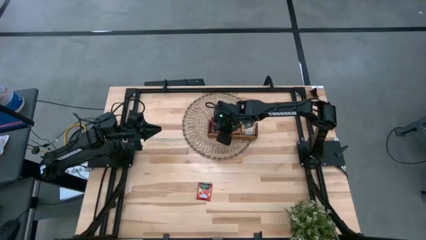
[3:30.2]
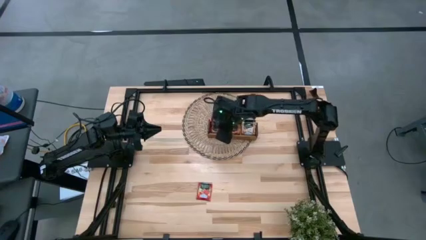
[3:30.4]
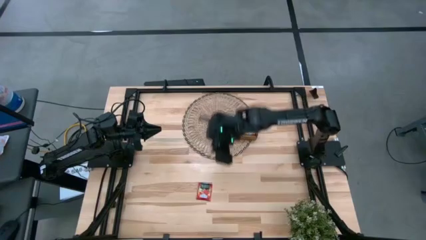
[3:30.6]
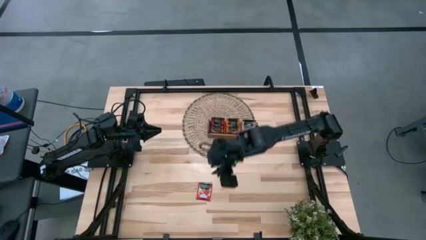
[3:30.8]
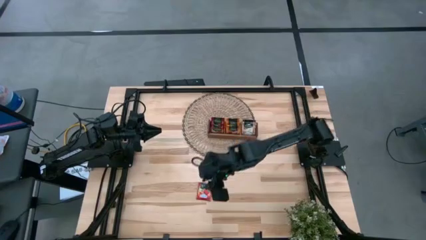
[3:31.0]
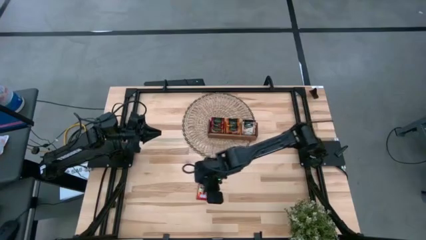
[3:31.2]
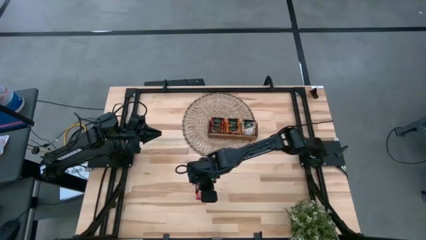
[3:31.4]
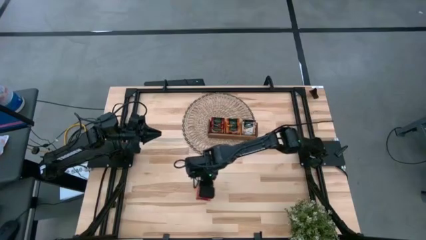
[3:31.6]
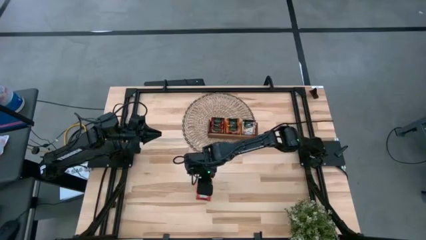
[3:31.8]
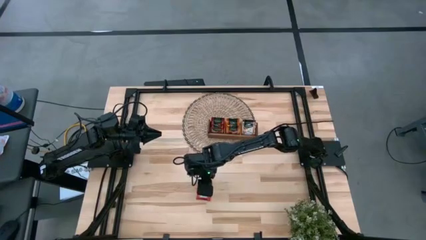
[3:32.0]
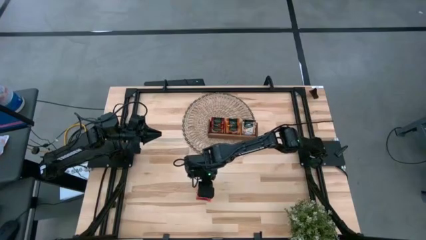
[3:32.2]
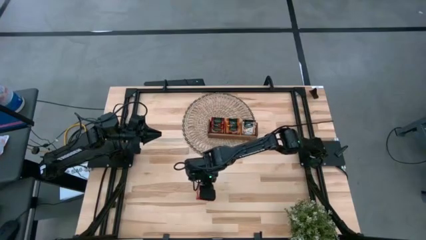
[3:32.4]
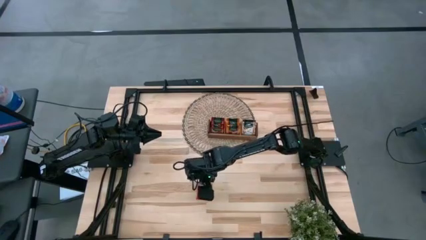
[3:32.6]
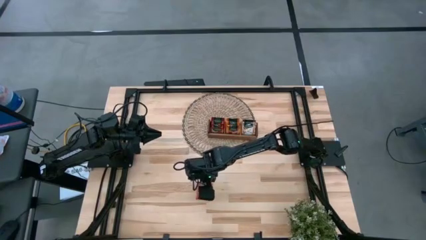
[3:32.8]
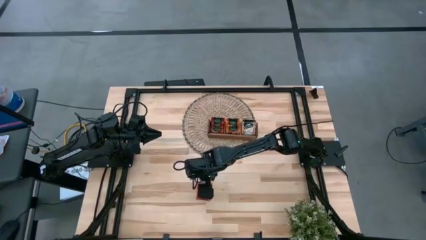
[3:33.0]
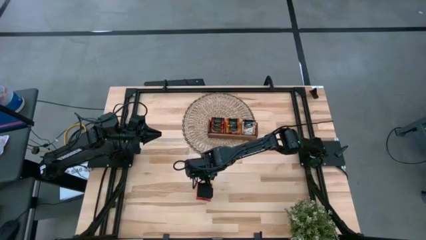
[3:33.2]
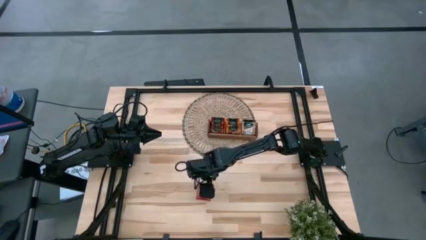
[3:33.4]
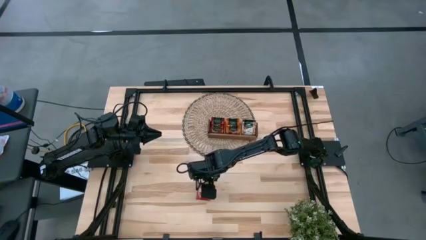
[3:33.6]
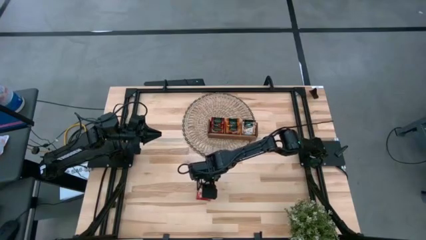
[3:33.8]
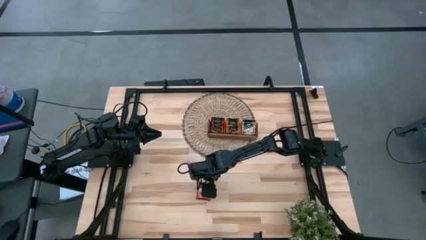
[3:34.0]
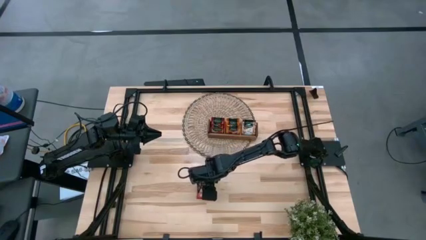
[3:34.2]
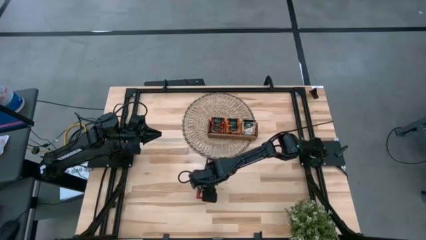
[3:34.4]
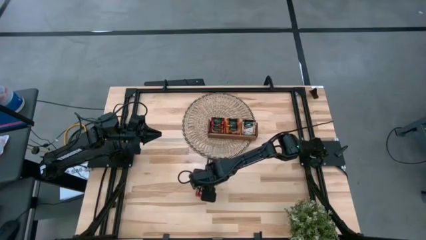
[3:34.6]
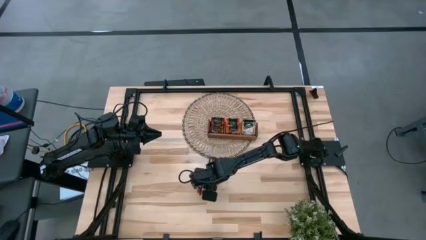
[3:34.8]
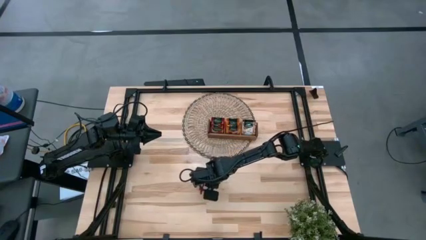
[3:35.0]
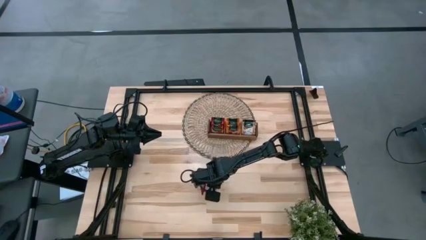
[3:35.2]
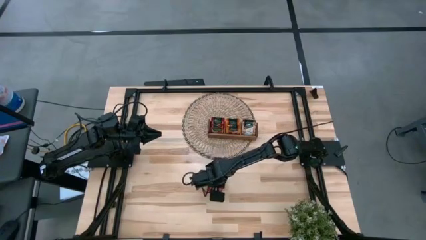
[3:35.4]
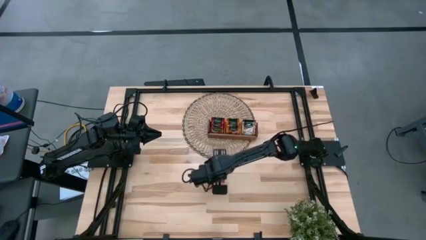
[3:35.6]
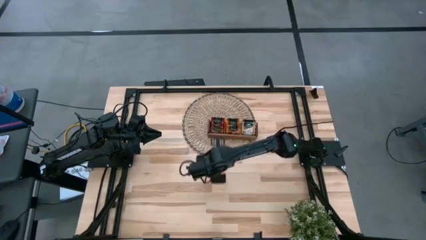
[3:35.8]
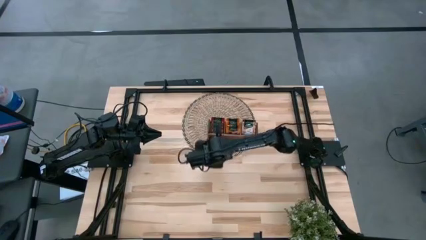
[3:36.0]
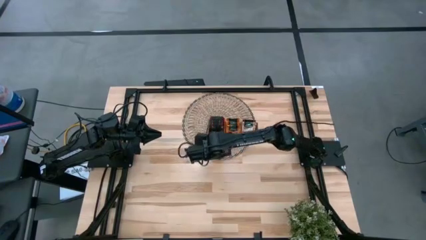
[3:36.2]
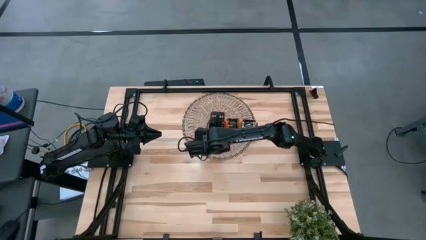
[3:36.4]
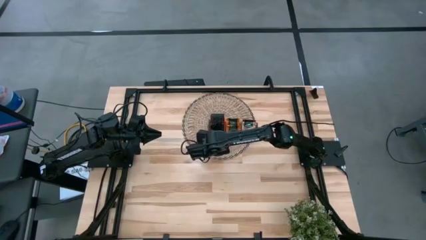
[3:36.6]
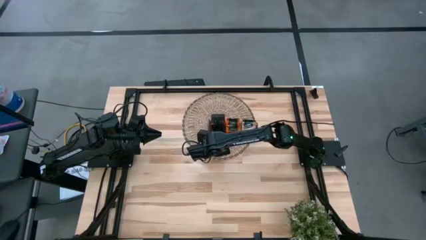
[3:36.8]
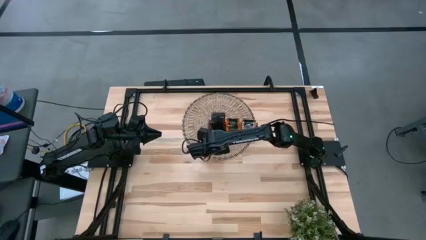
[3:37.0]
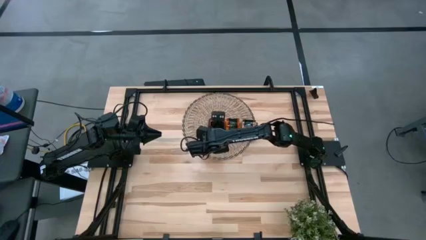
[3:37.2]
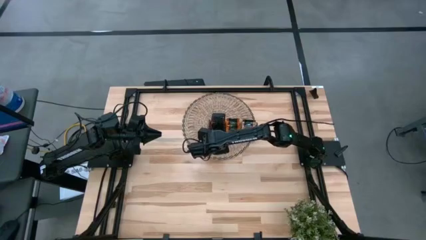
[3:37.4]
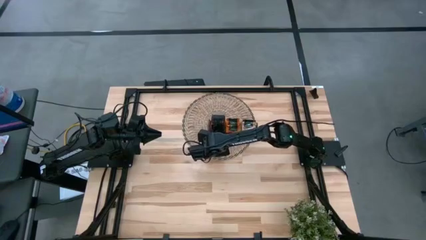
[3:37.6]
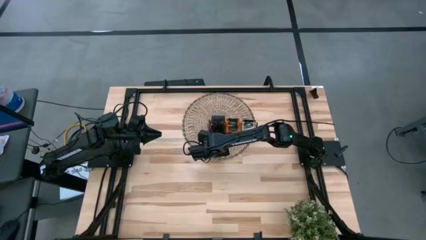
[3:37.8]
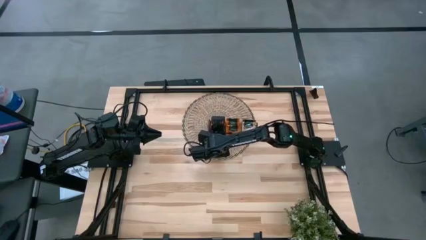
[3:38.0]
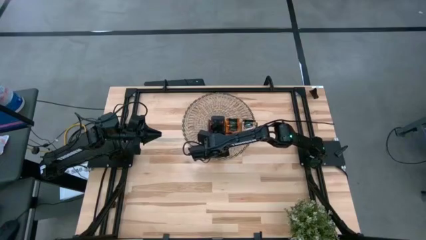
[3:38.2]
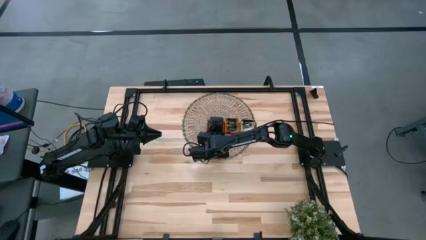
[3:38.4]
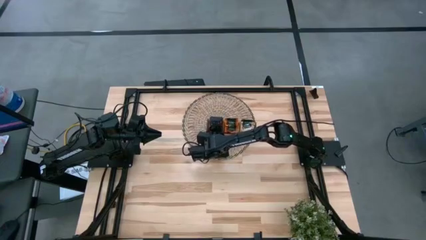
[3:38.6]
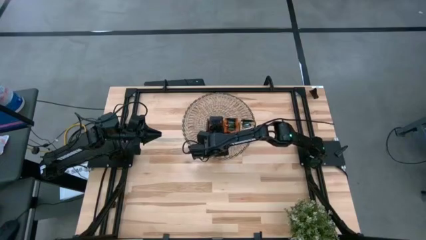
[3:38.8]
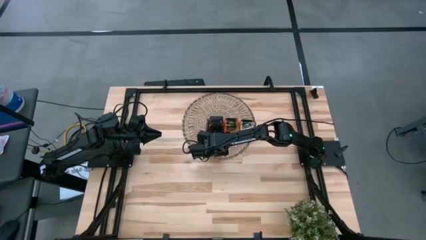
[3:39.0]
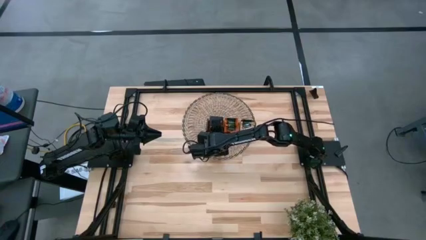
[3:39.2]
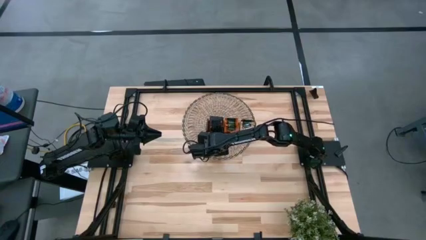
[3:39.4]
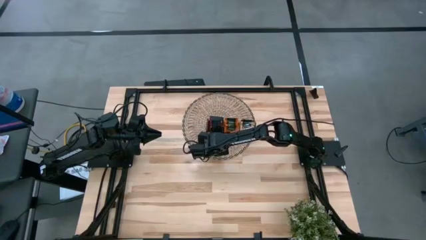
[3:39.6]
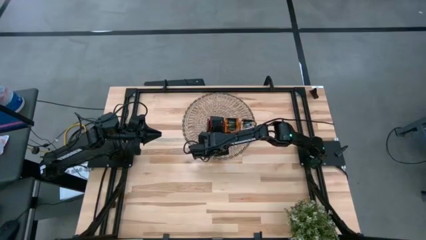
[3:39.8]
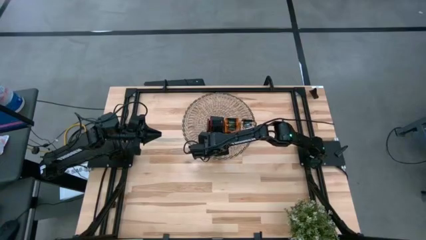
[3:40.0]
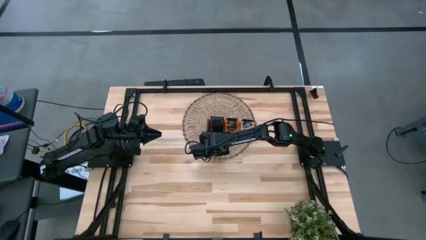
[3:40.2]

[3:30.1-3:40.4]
Task: Pick & Place Tea
Put the red tea bag into the left slot of the wooden organizer
